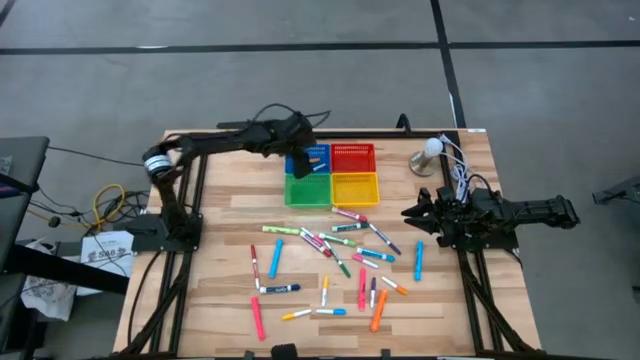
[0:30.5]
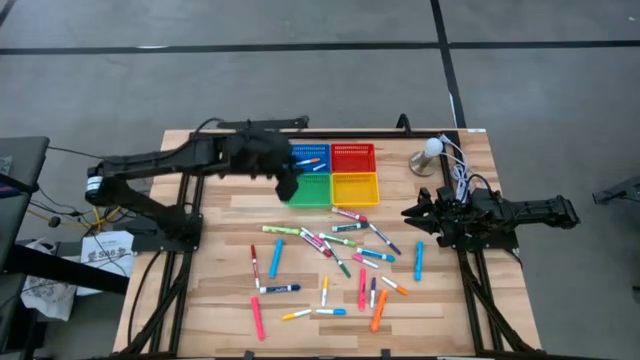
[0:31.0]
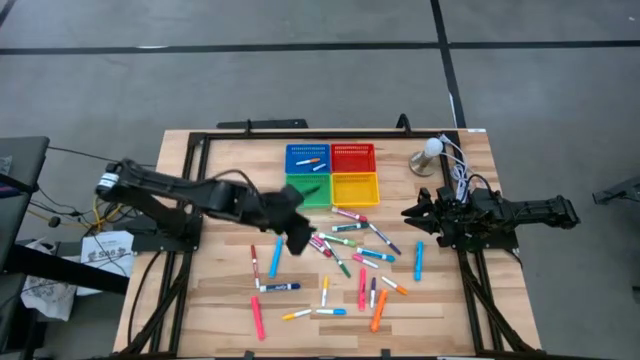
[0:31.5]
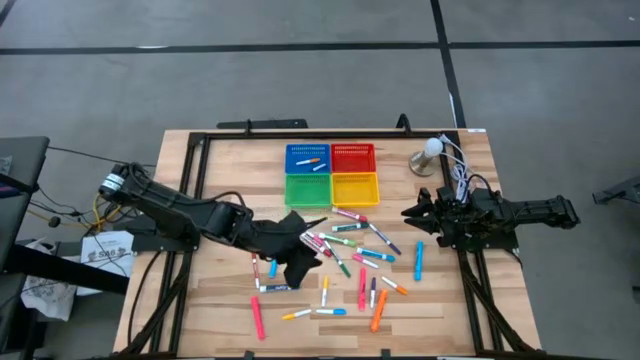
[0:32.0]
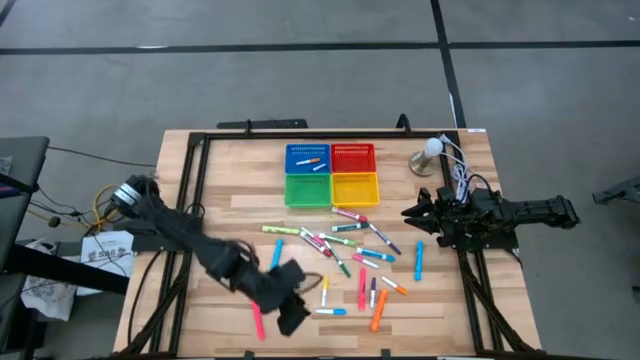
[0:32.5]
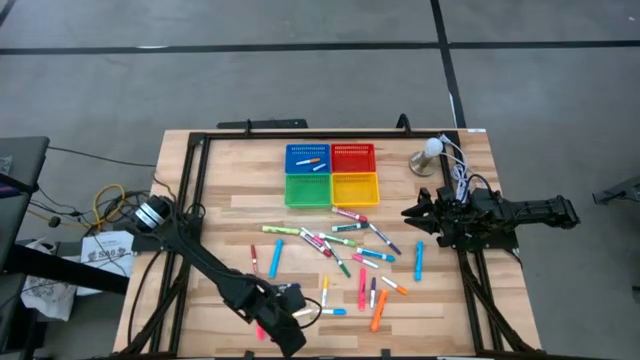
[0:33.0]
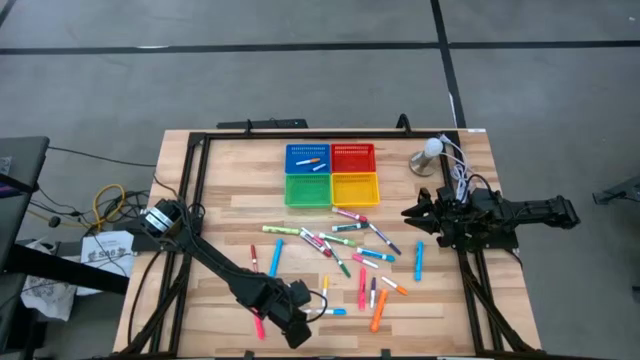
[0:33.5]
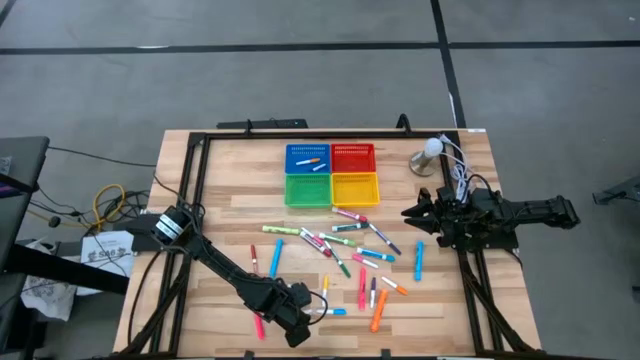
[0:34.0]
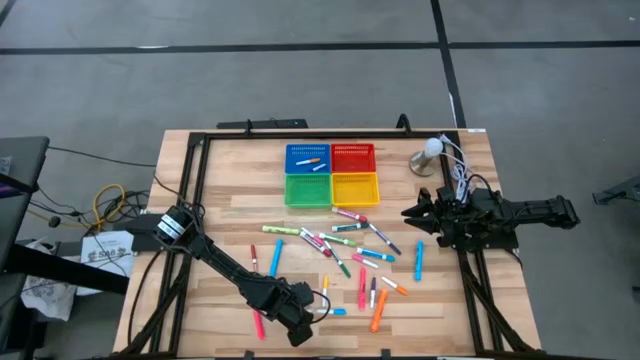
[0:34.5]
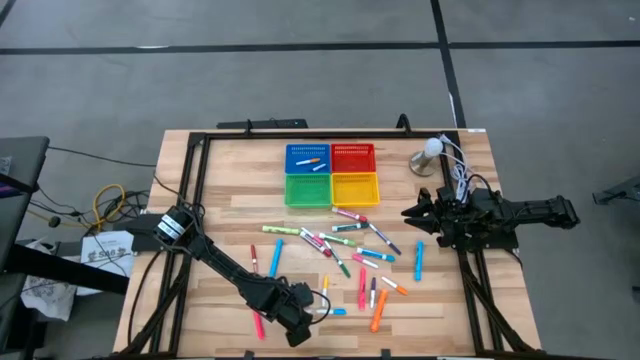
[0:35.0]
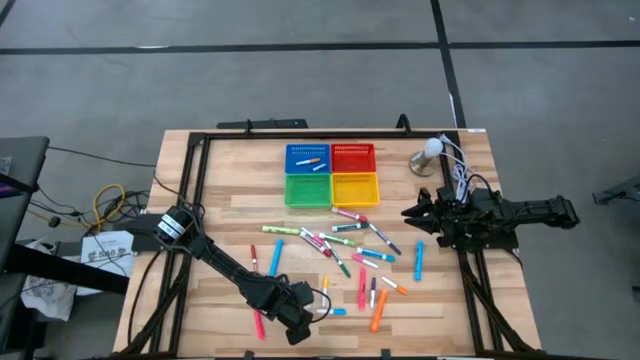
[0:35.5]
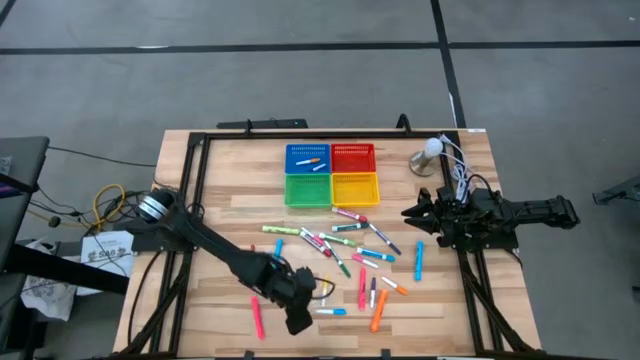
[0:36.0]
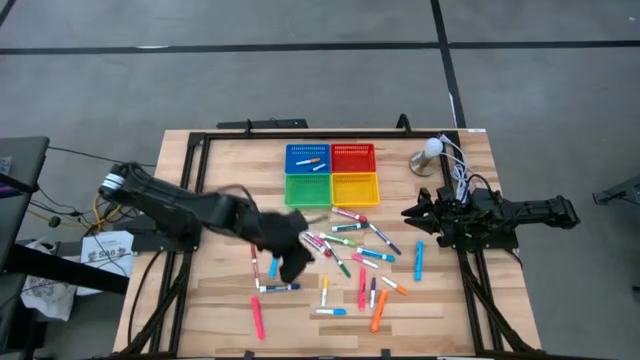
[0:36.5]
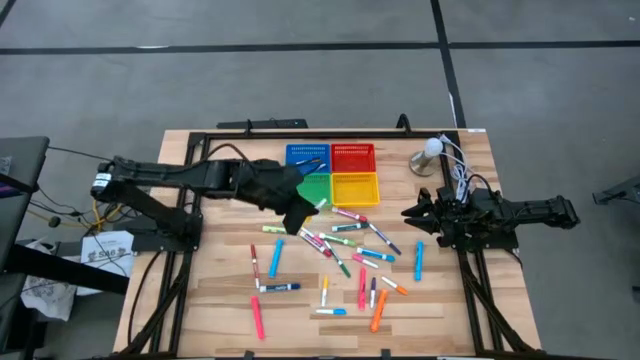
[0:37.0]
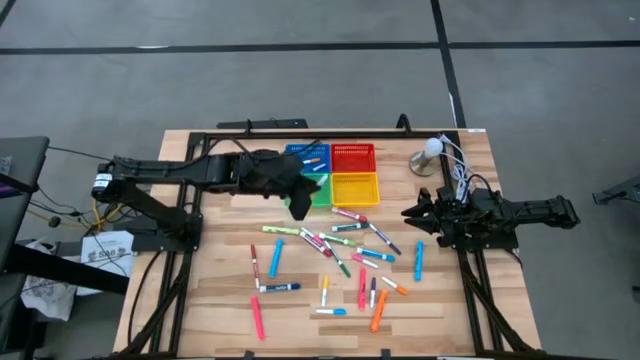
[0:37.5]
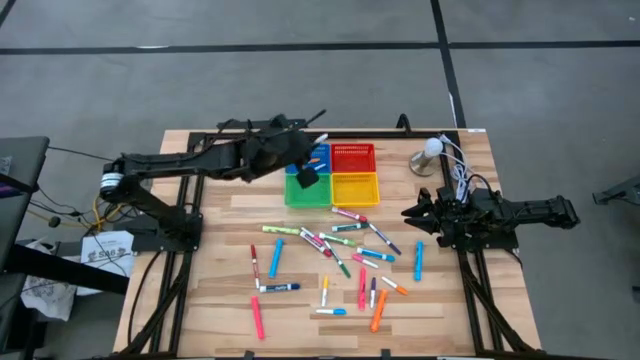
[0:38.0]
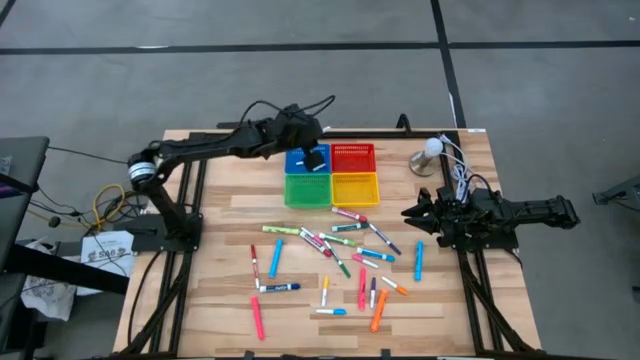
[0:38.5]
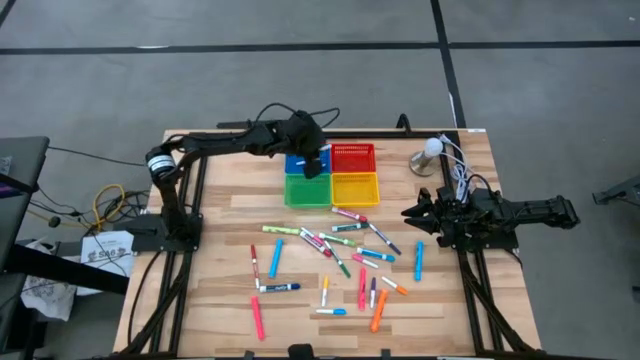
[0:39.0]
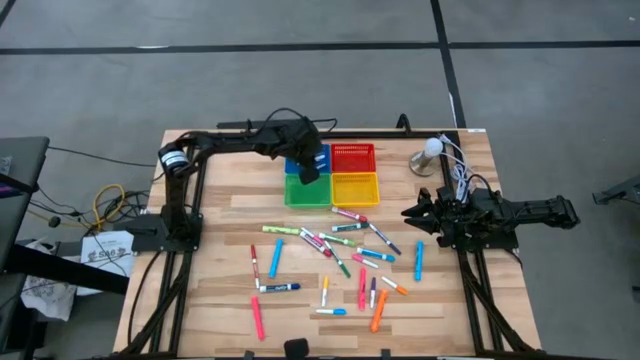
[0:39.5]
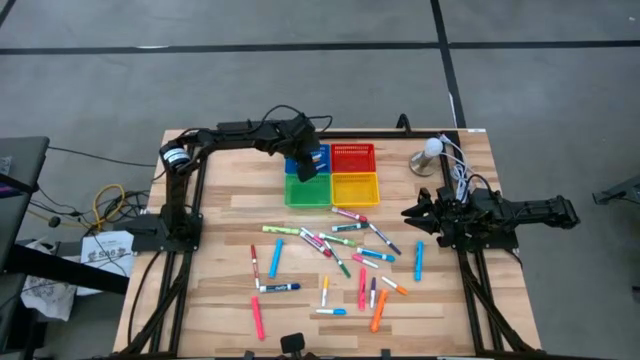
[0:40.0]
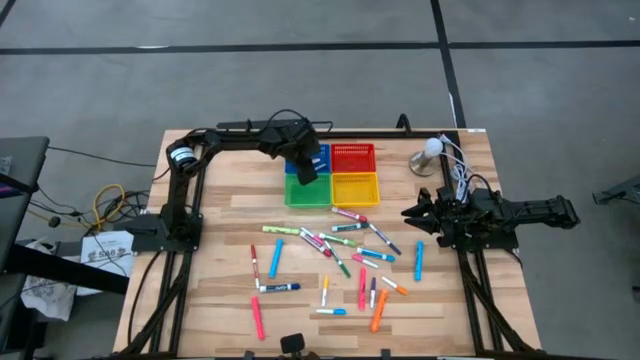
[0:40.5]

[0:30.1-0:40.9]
Task: Pick & Place Markers
Put the bottom small yellow marker into the blue bin

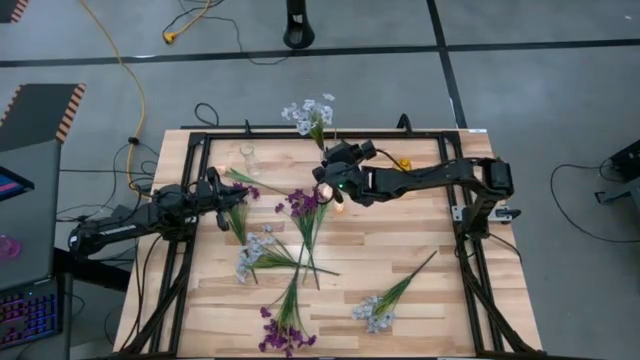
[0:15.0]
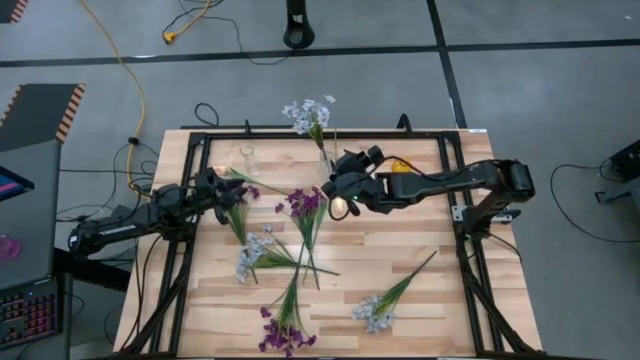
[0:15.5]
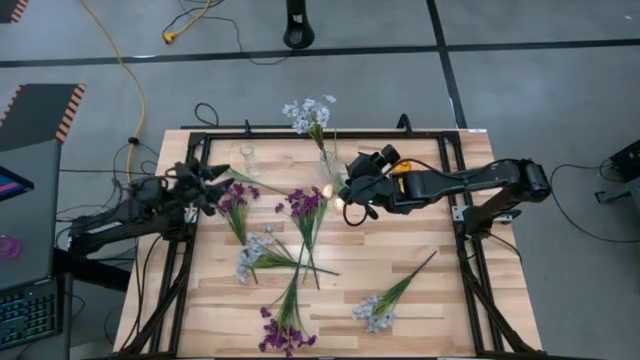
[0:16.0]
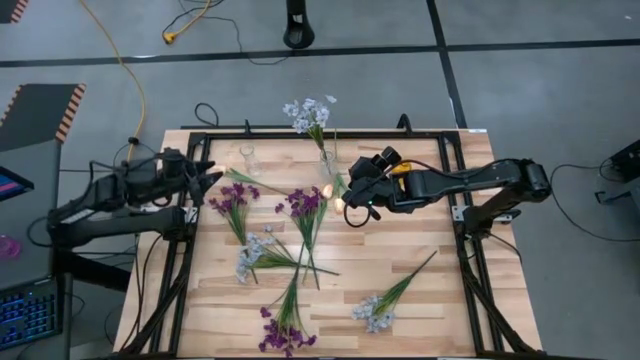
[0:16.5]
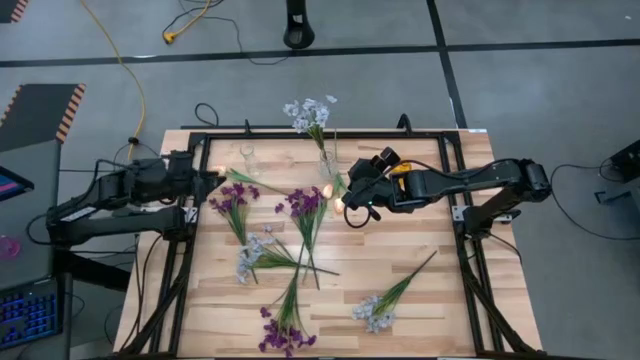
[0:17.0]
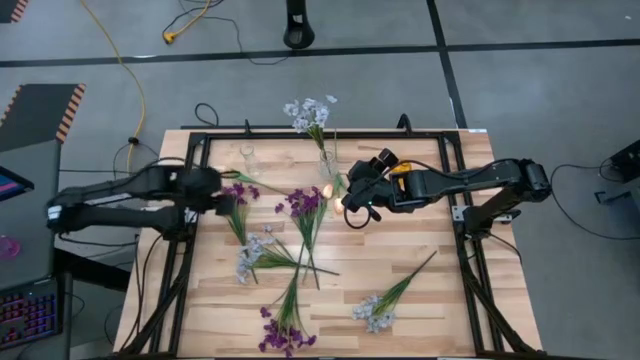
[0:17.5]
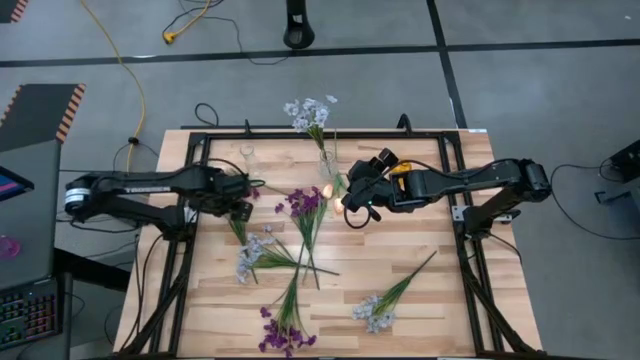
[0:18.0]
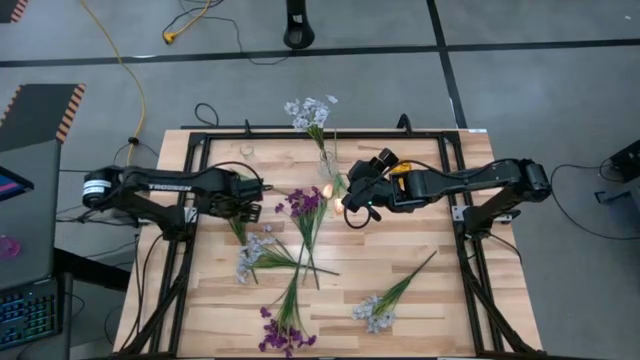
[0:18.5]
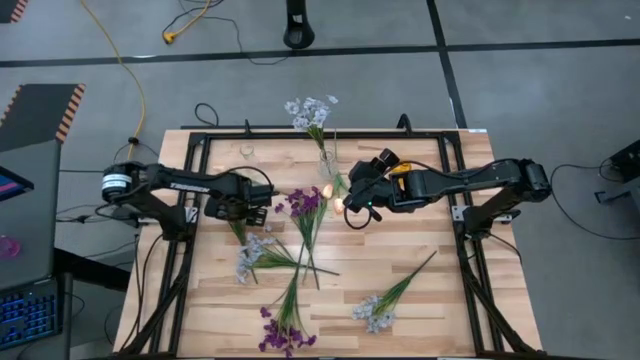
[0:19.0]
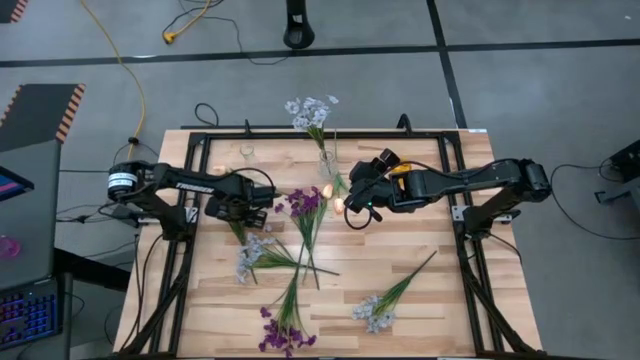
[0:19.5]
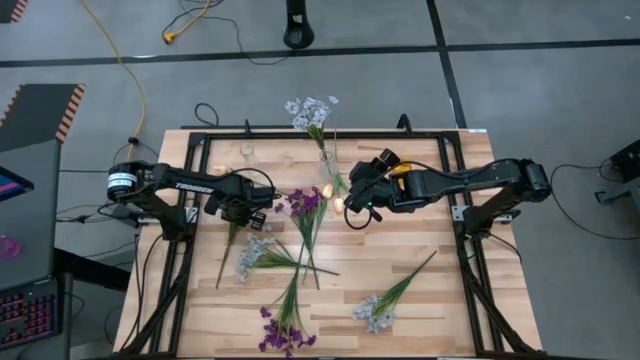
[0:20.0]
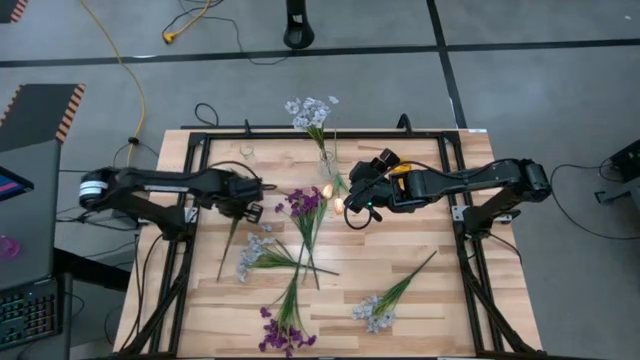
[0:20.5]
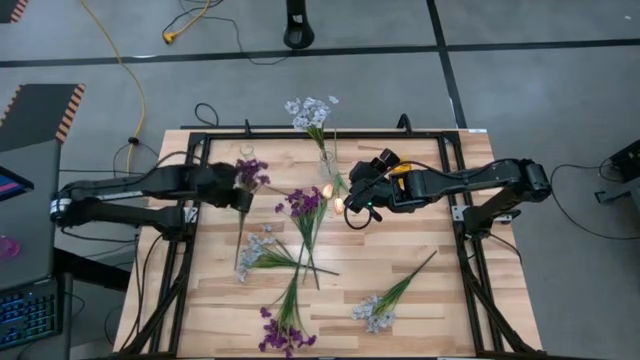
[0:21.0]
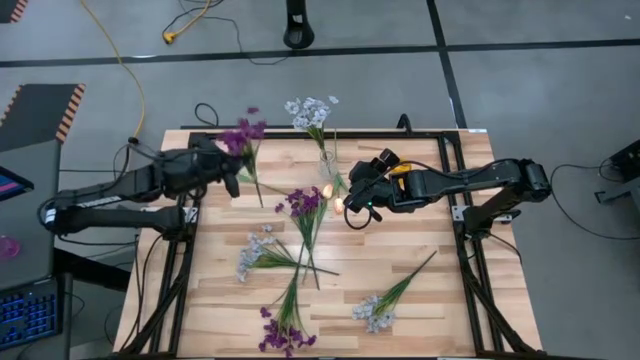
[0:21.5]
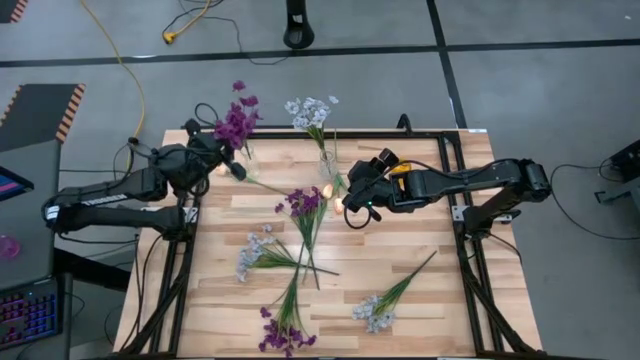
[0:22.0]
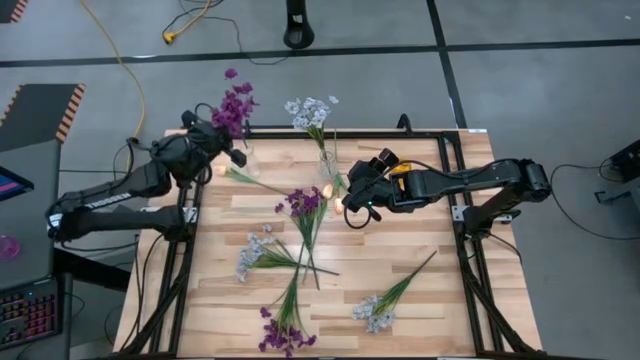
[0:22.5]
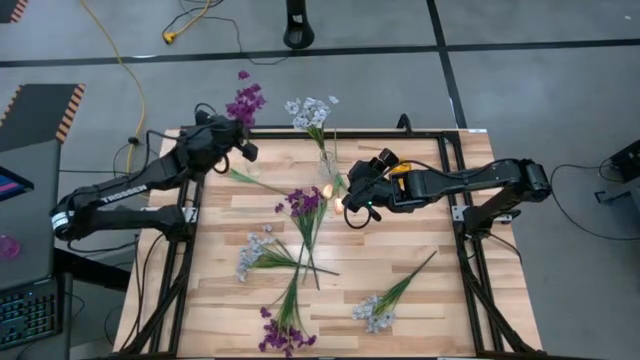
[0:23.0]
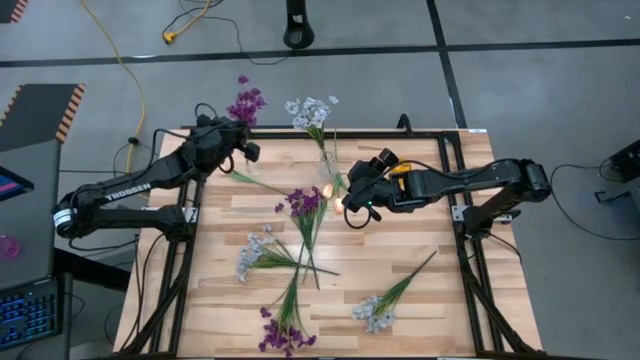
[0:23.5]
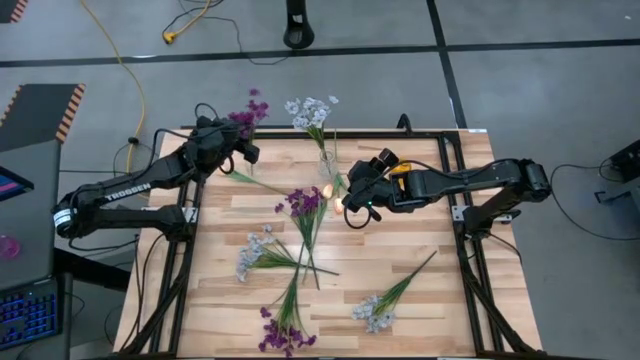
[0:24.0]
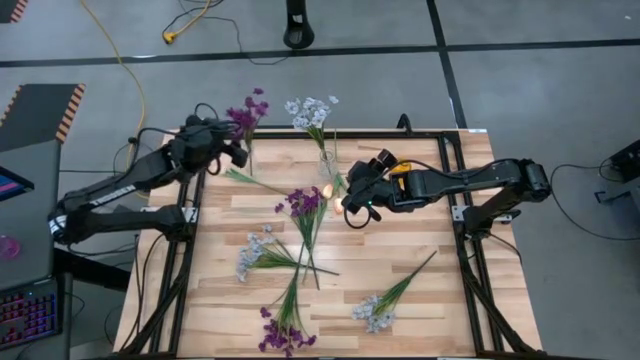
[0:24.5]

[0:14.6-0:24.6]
Task: Sort flowers into vase by color
Put the top left violet flowers into the left transparent vase
